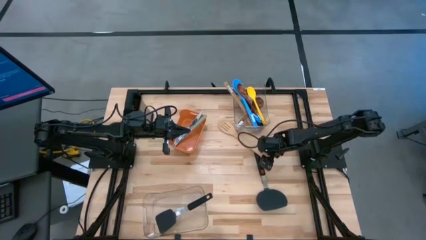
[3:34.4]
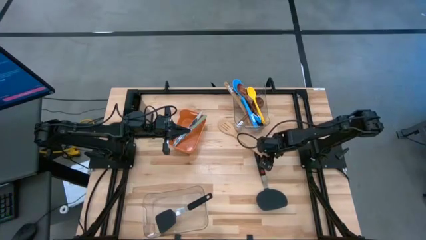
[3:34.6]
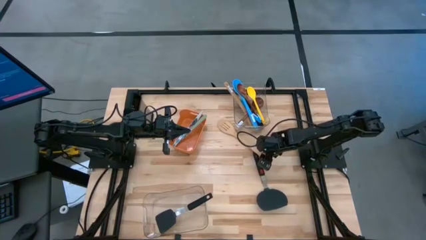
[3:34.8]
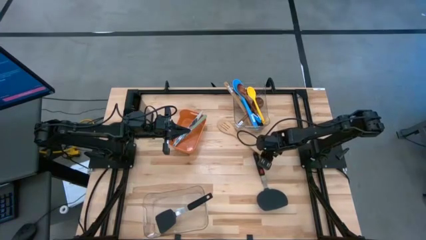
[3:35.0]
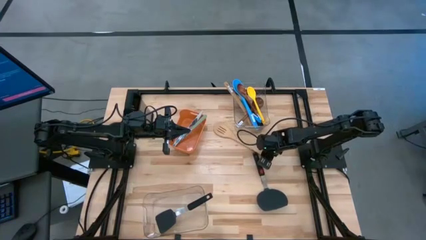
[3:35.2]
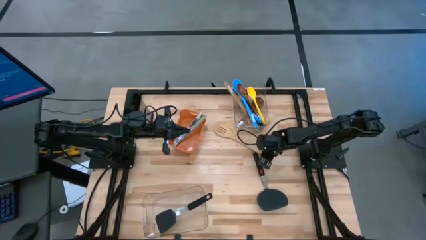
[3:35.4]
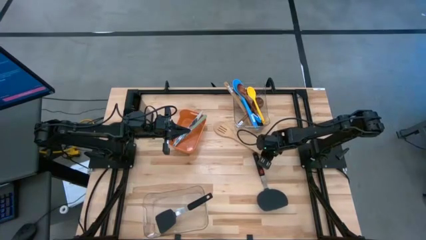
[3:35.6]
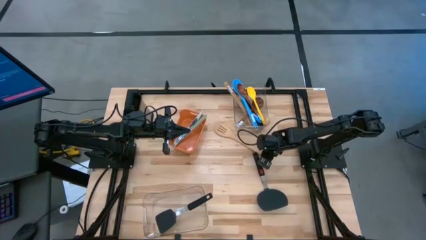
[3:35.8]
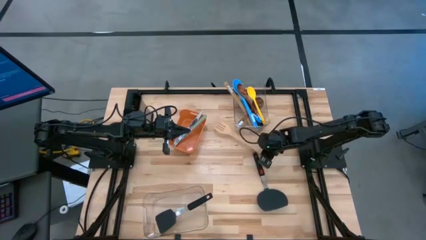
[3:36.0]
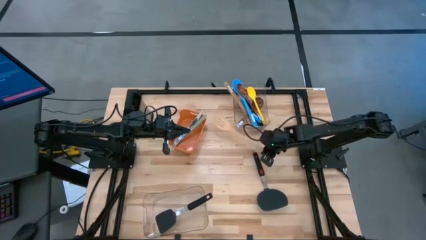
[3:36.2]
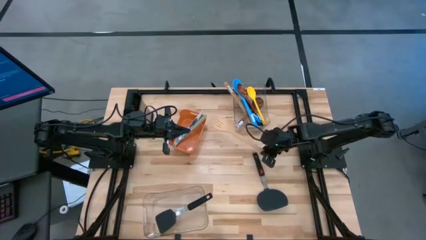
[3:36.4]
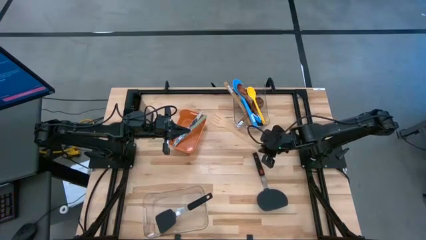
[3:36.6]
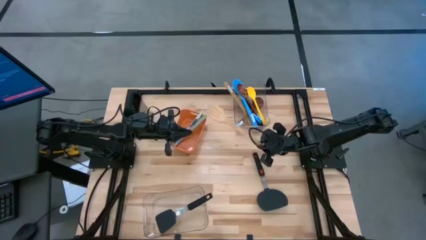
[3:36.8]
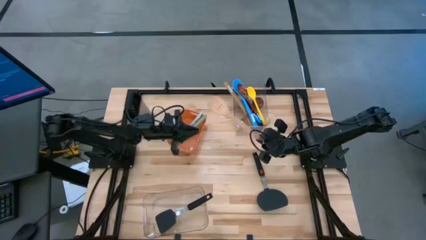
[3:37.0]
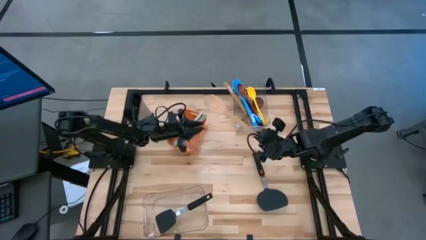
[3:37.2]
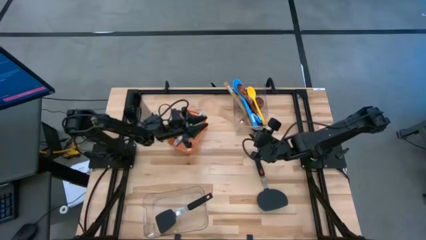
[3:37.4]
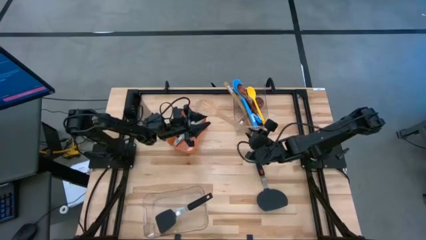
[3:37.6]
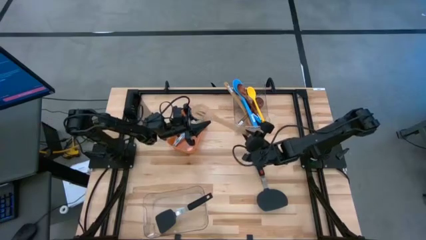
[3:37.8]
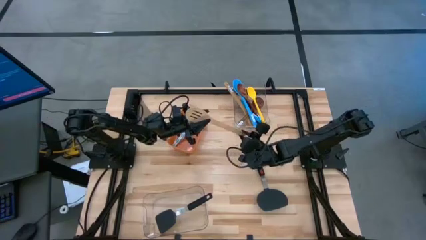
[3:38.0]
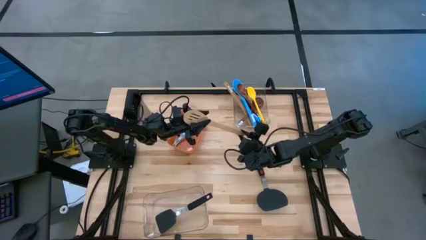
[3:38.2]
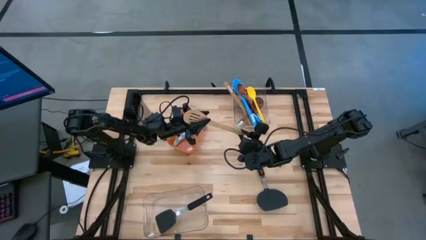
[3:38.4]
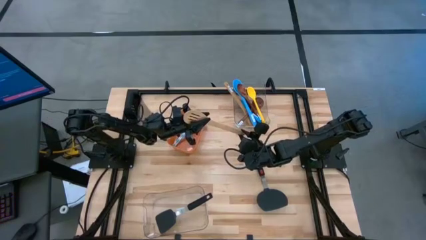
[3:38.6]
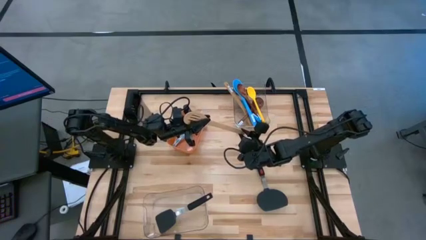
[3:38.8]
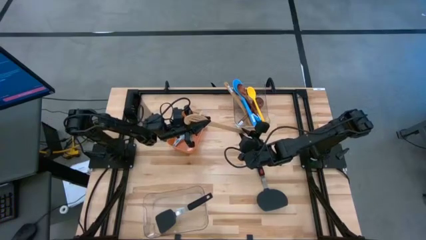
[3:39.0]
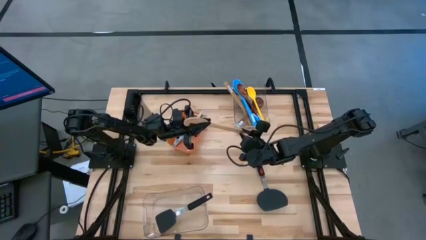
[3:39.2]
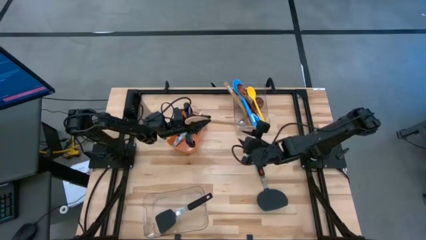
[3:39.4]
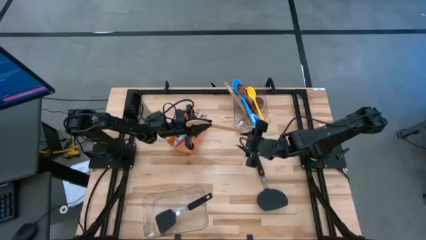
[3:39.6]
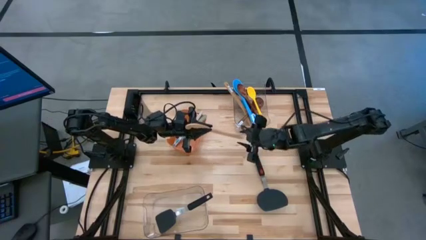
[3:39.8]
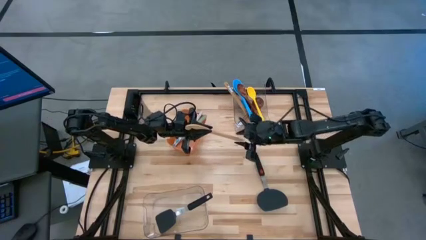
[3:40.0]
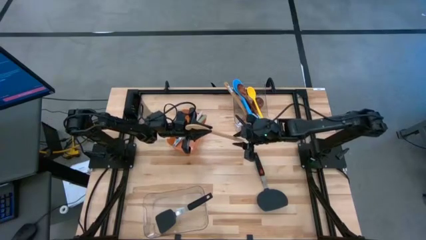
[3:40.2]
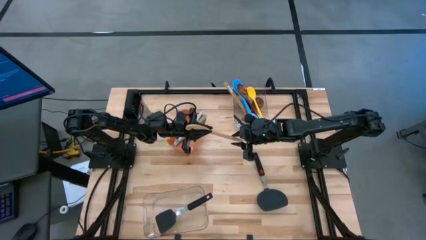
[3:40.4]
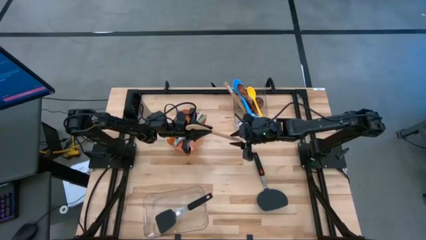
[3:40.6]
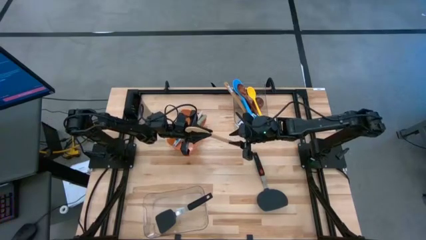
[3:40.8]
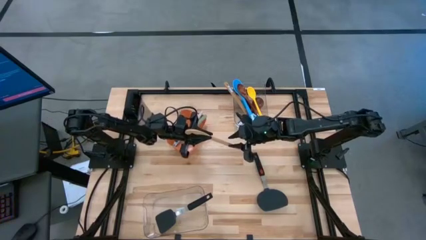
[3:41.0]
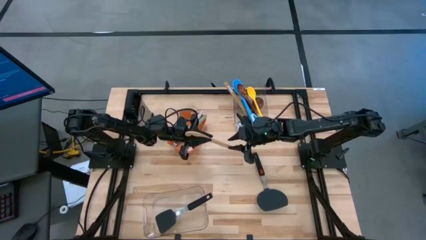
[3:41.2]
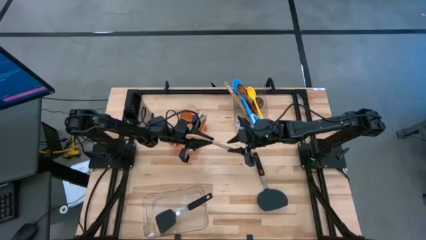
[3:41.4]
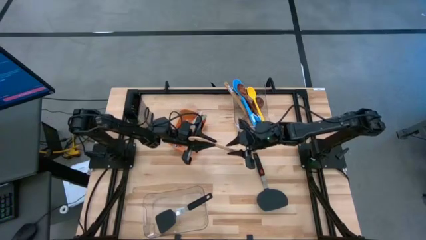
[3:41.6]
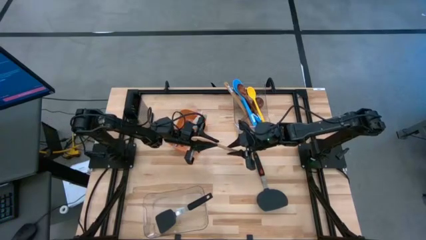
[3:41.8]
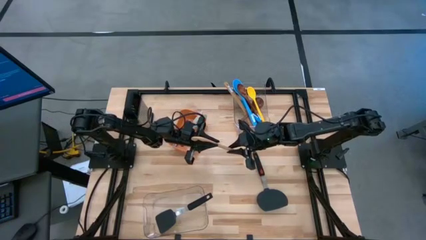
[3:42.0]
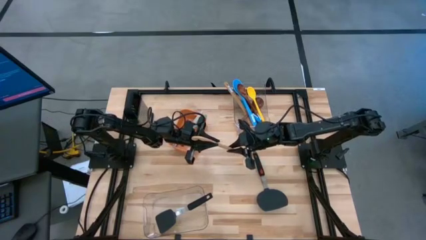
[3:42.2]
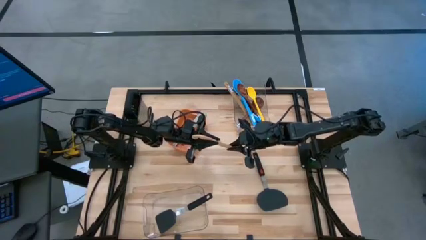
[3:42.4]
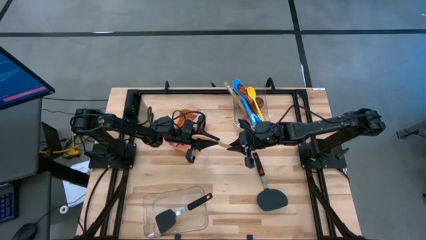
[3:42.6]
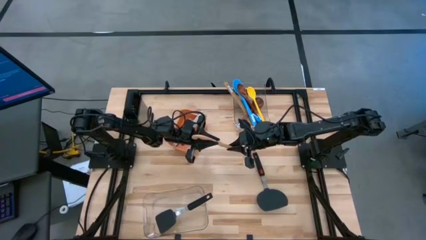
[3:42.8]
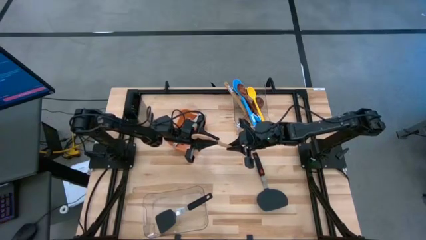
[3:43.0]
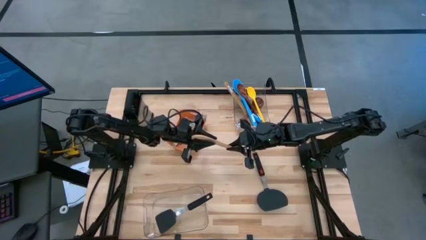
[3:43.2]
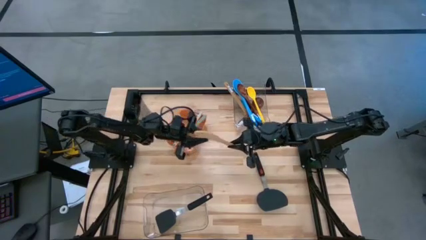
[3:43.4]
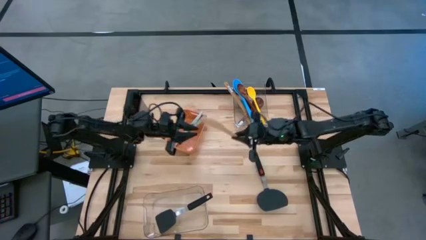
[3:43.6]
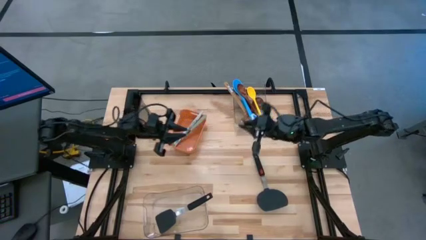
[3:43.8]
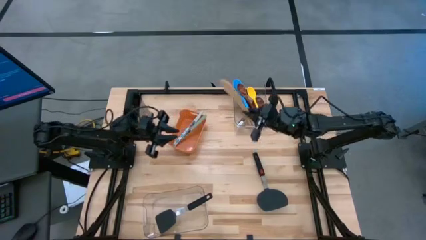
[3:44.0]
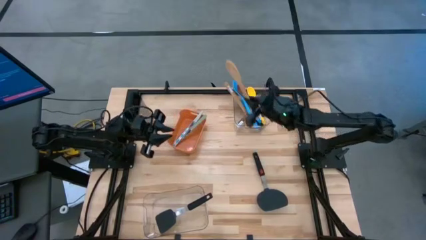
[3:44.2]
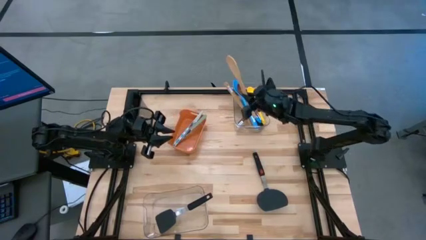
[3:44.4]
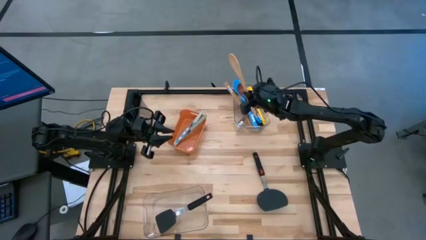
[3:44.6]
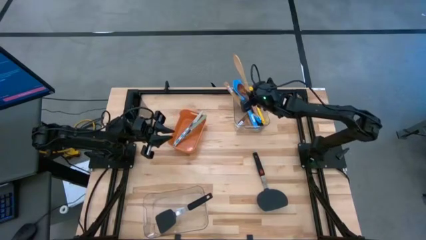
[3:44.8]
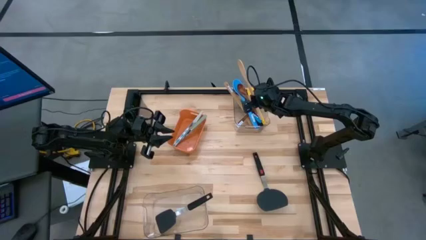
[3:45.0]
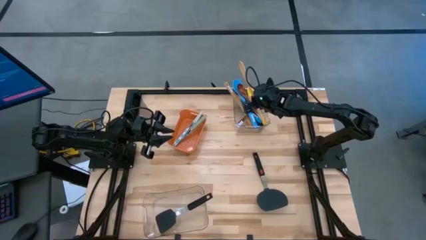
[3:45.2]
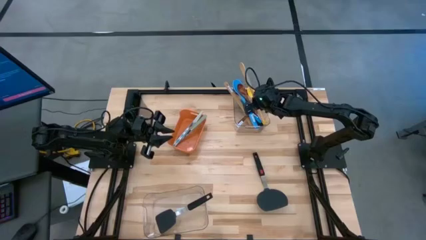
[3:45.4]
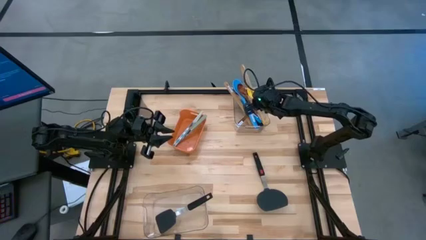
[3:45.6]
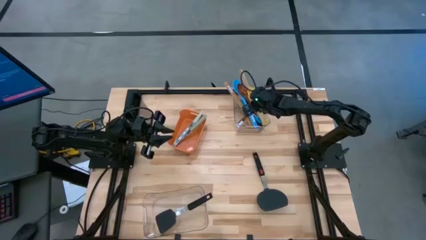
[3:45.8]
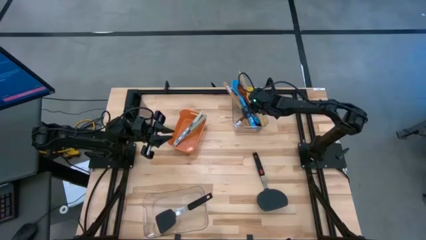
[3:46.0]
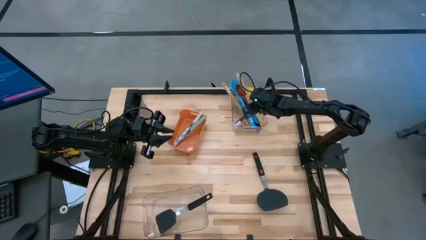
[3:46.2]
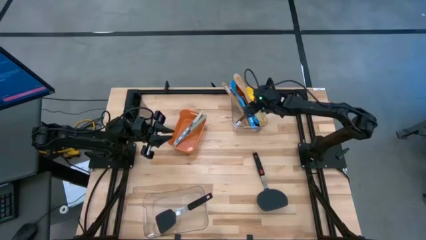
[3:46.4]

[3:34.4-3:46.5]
Task: Pick & Place Kitchen Items
Put the brown spatula into the top transparent bin
